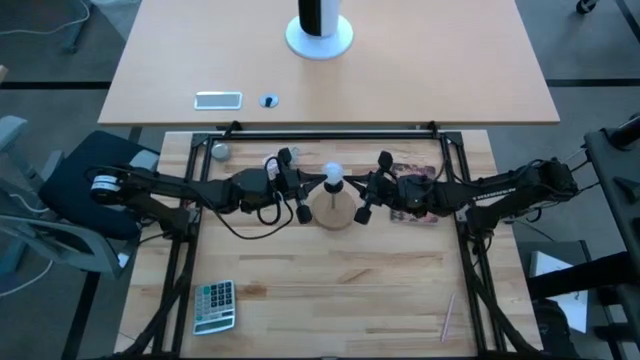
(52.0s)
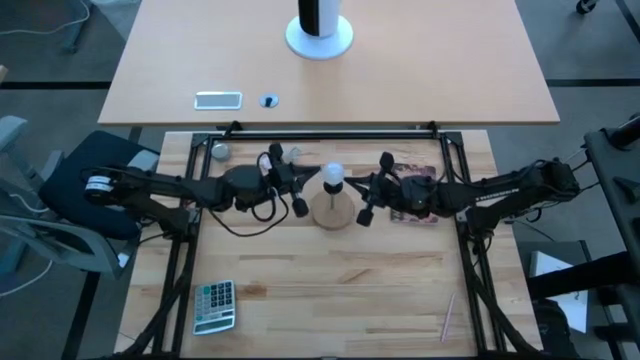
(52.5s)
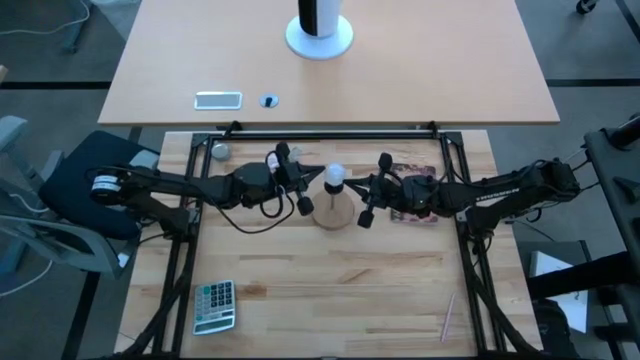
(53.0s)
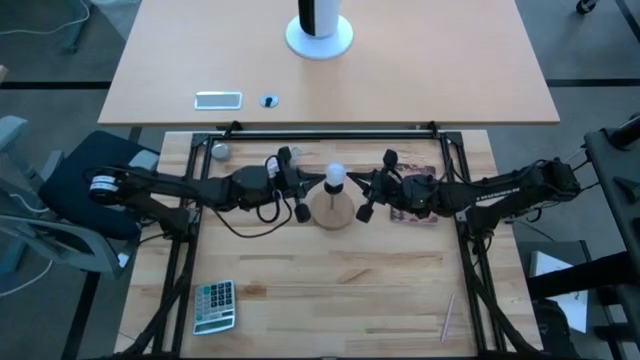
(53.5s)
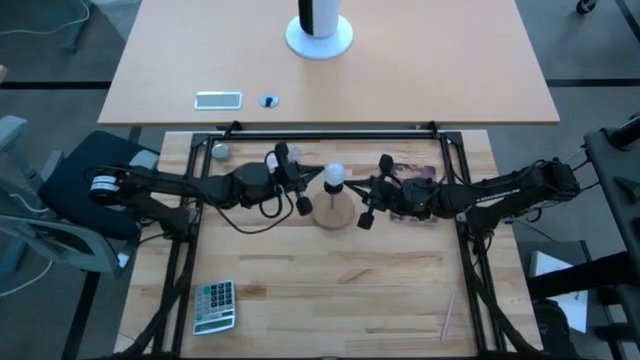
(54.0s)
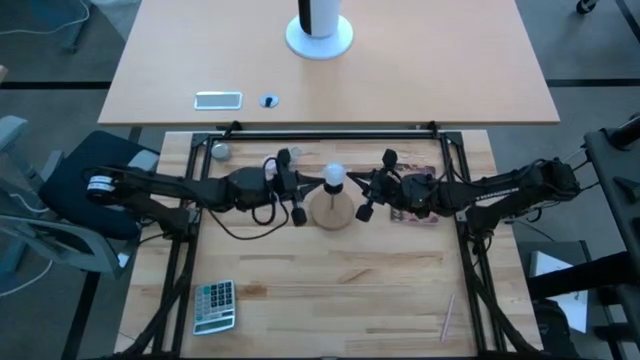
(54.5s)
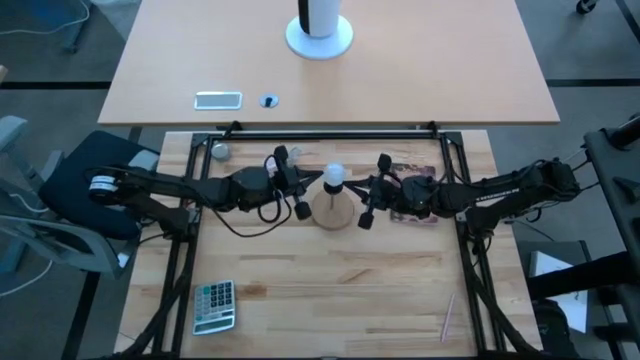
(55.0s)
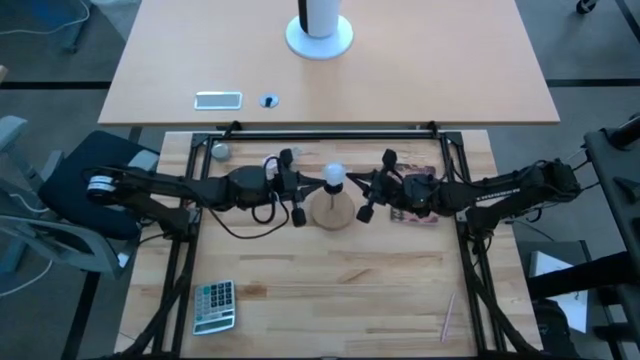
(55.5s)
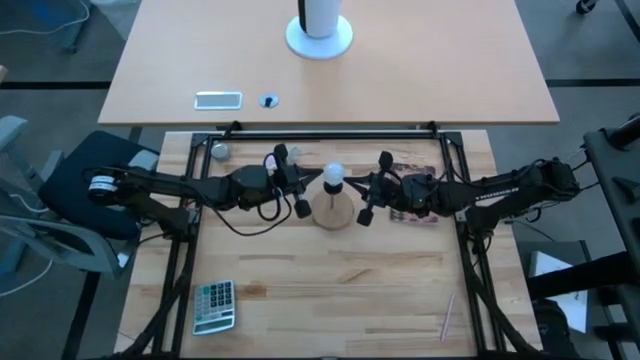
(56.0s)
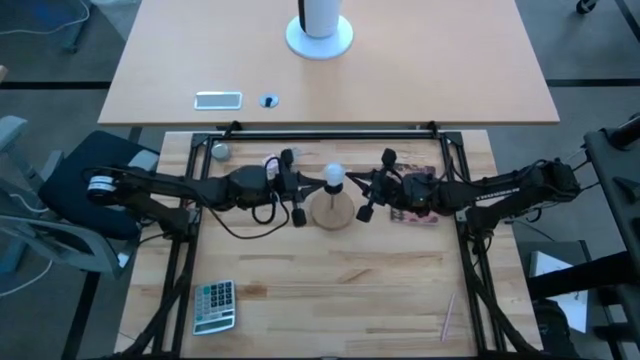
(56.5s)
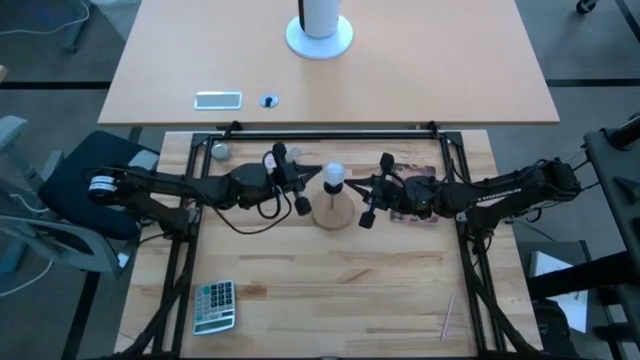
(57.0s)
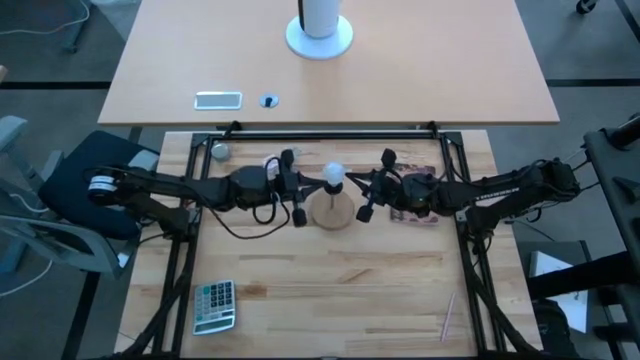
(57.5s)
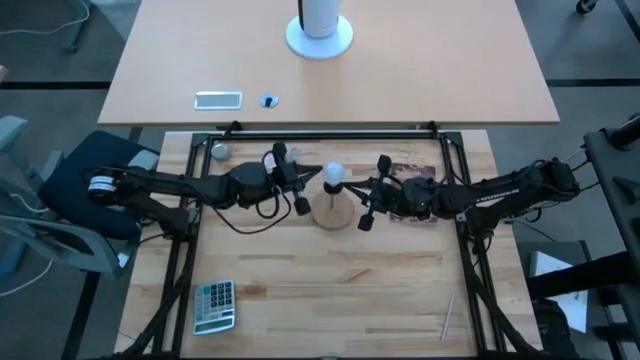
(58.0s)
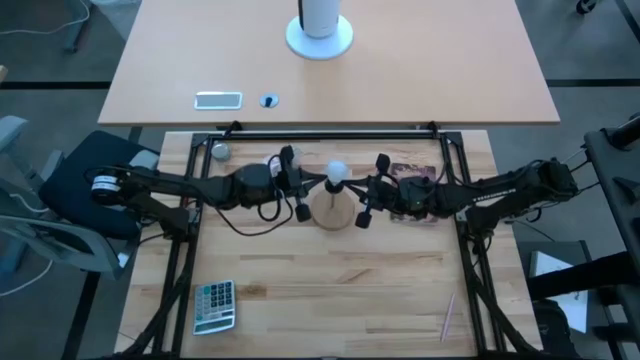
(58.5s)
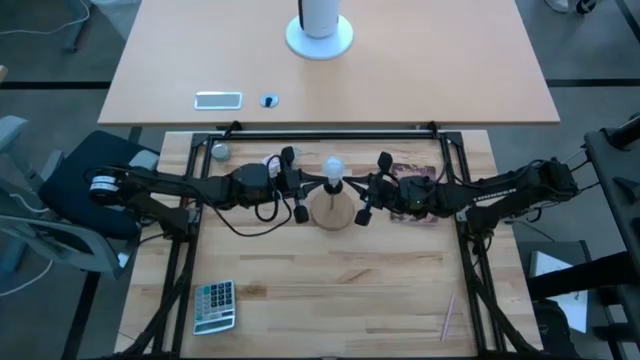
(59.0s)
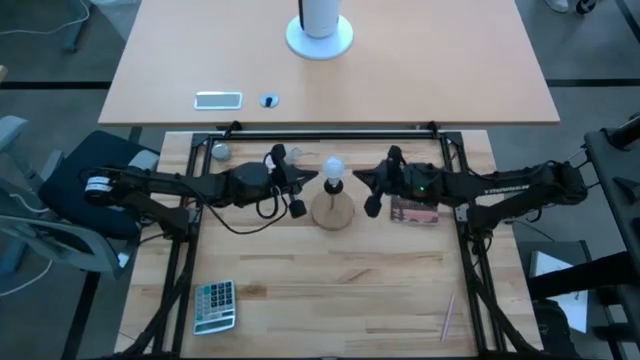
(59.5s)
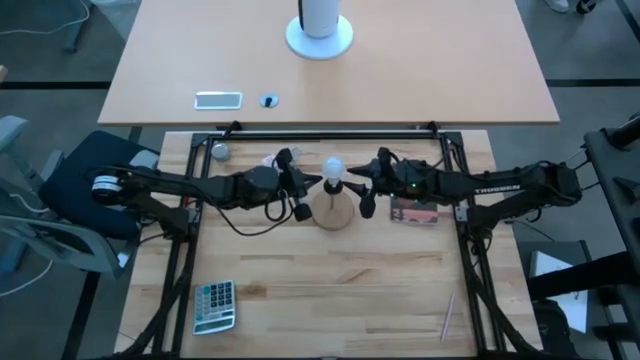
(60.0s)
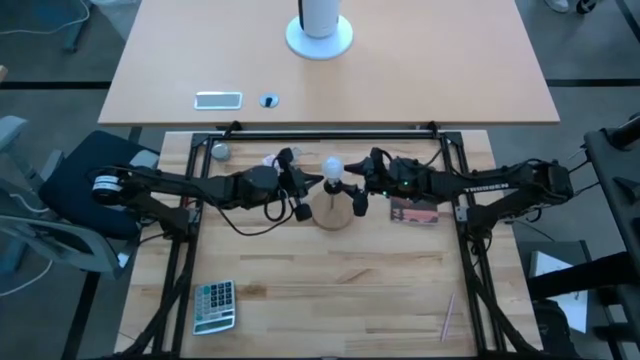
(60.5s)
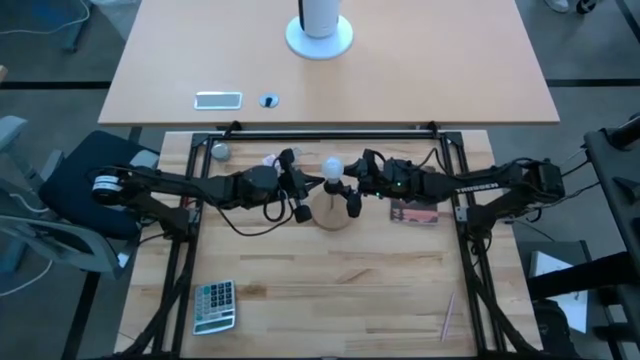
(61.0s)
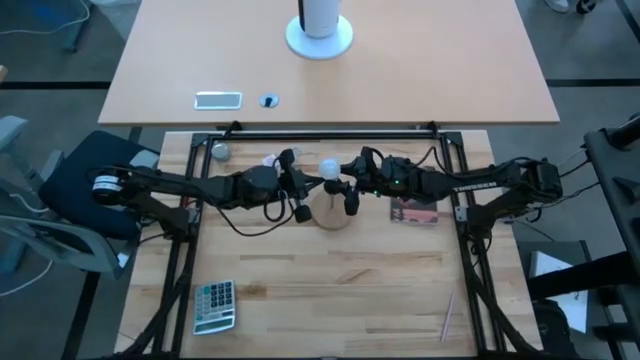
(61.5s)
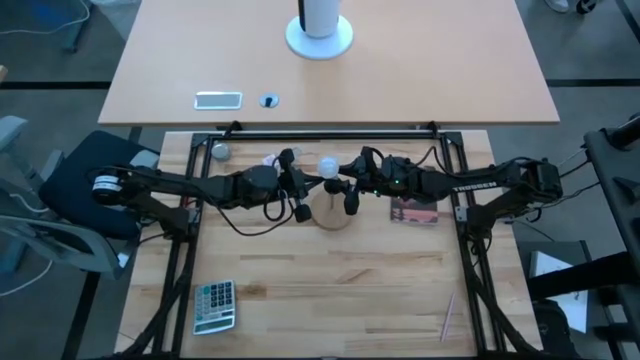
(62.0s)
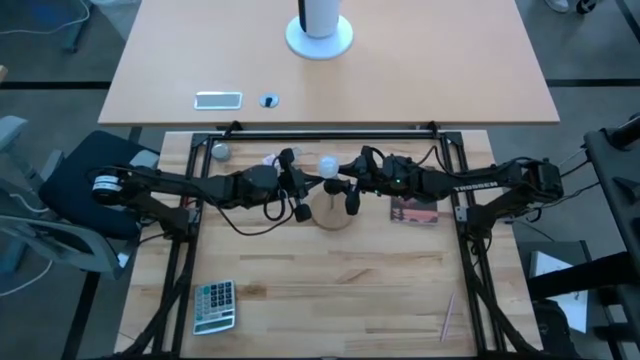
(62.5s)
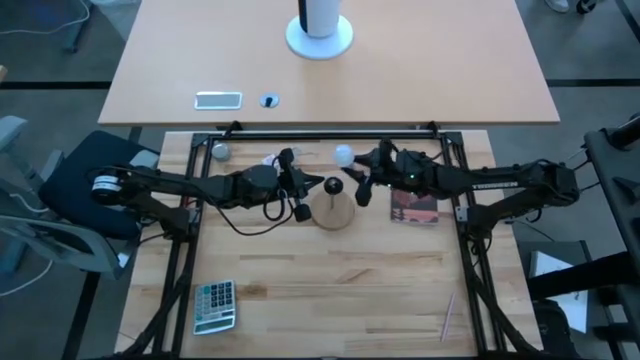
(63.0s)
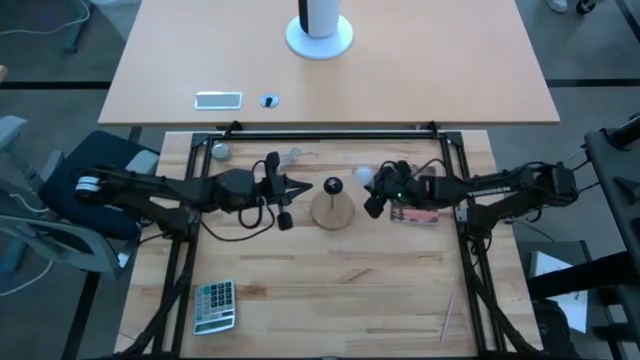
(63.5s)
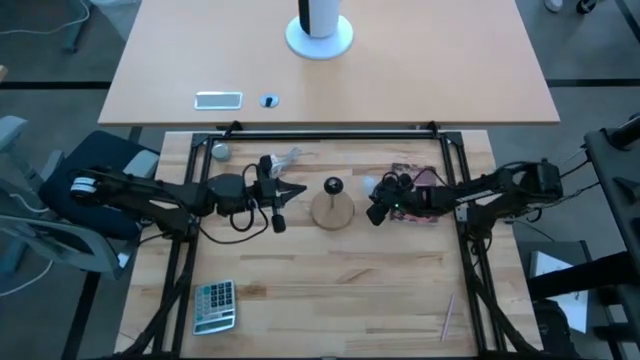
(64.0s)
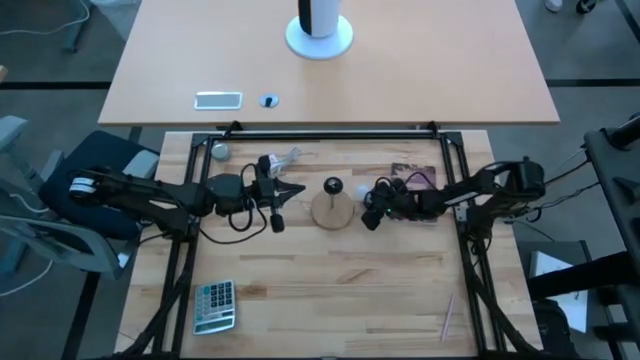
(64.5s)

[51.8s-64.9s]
Task: Screw lightbulb
Remove the lightbulb from the lamp

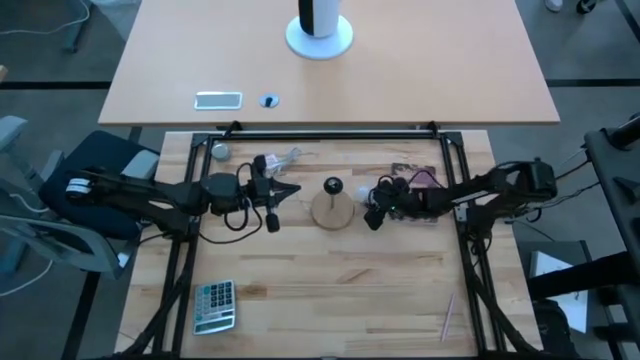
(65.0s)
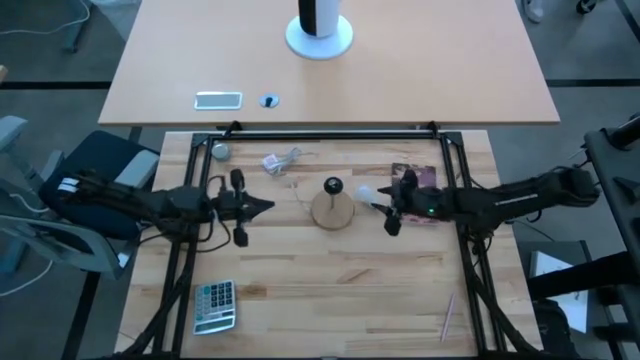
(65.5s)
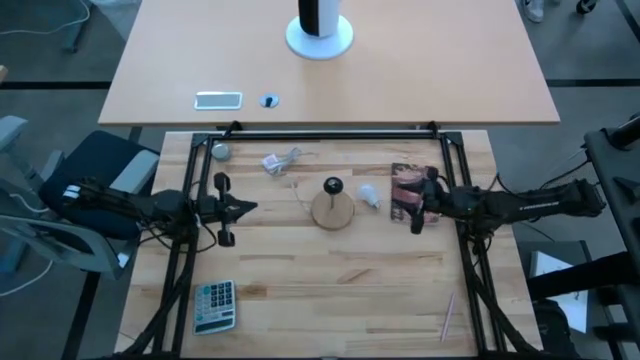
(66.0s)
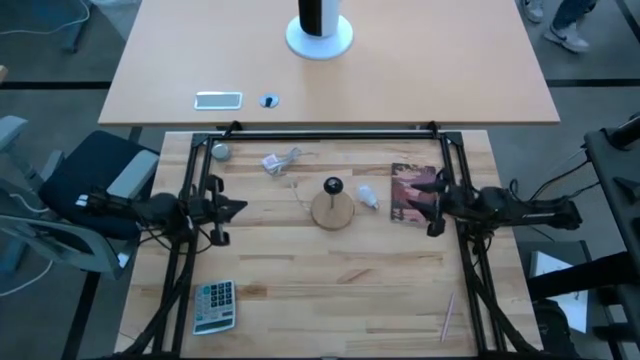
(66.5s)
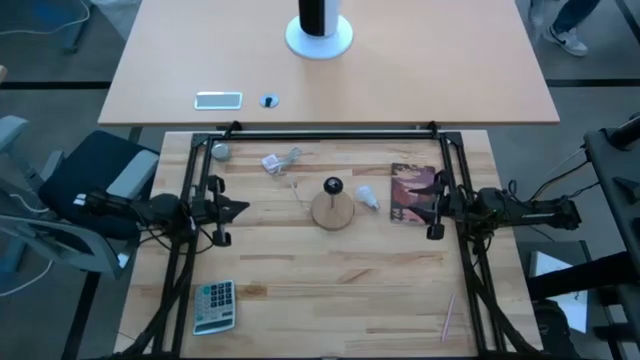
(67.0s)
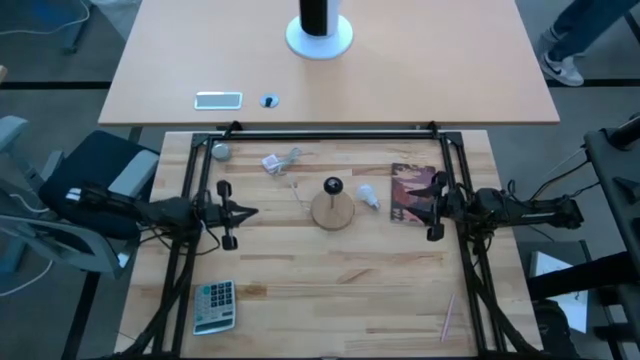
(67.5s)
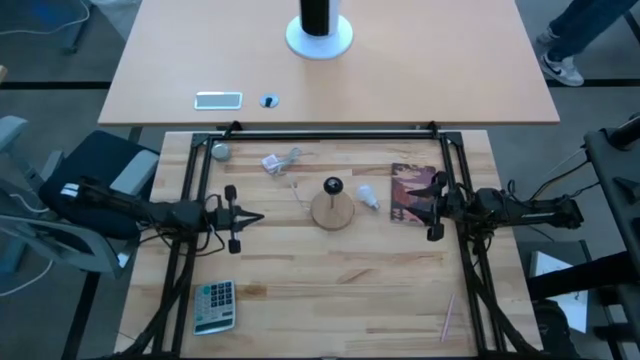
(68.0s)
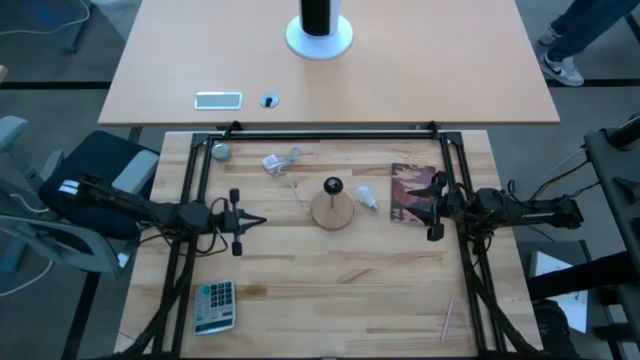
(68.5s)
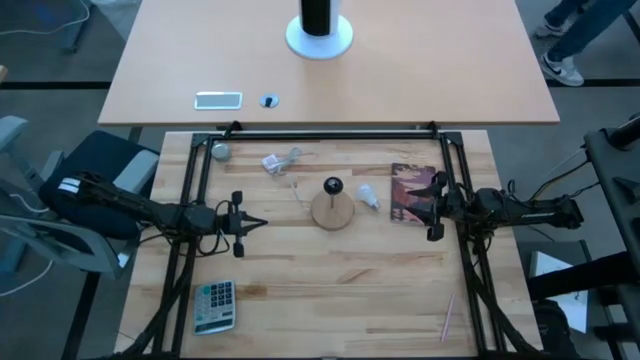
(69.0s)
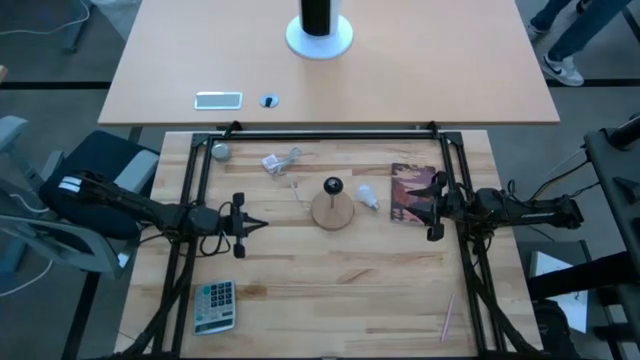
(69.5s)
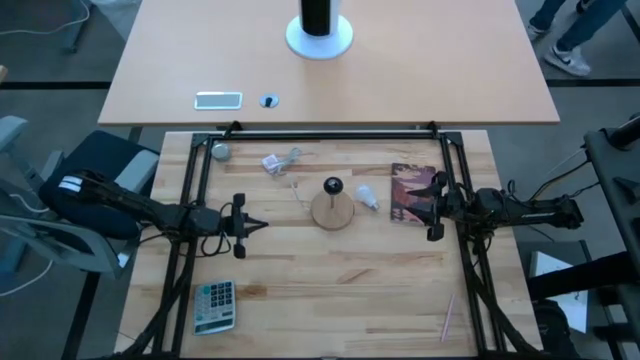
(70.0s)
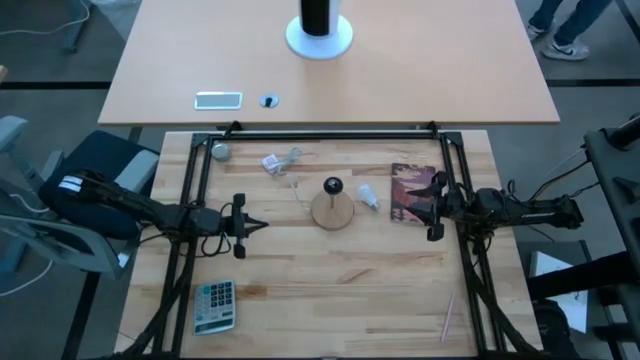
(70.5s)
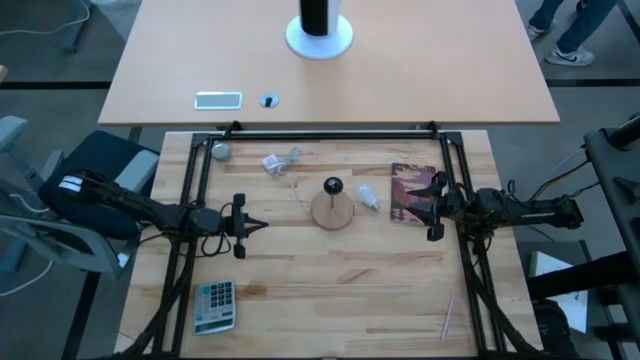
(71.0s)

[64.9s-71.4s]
Return to Home Position

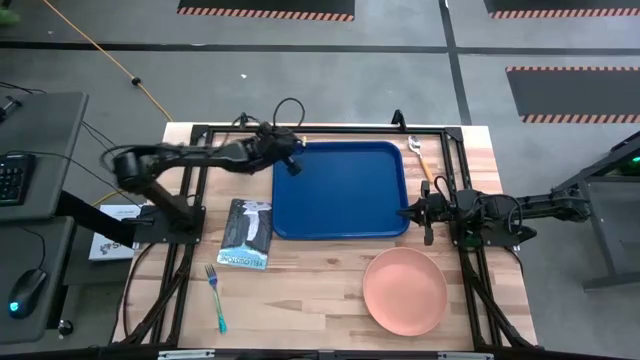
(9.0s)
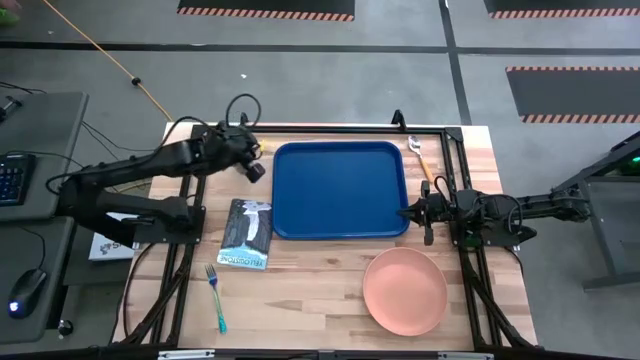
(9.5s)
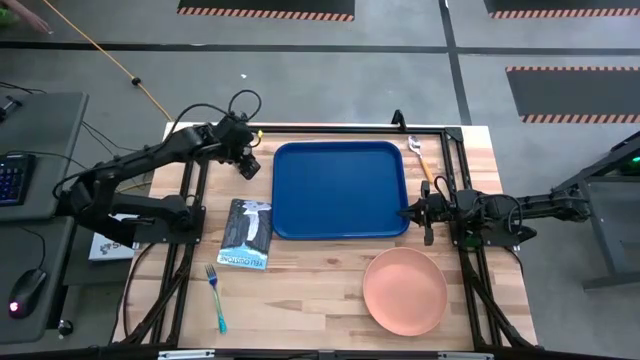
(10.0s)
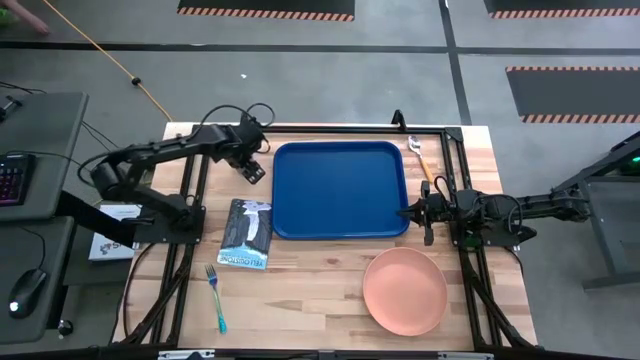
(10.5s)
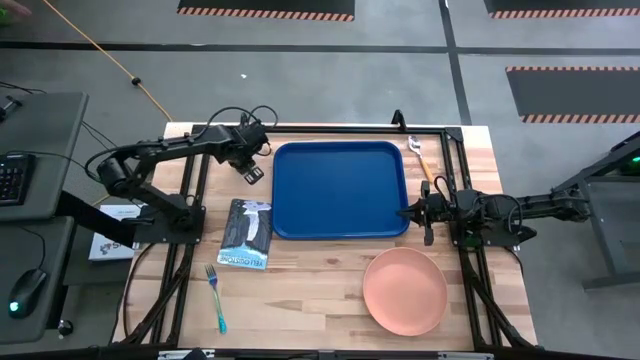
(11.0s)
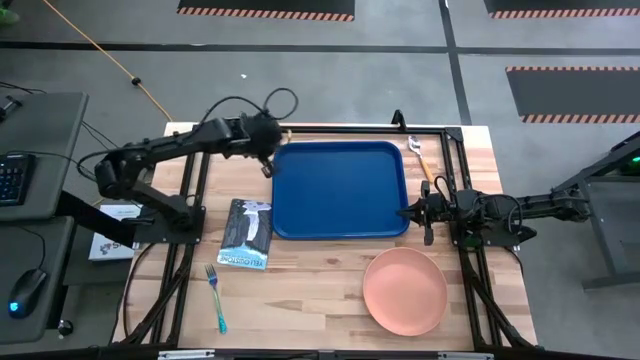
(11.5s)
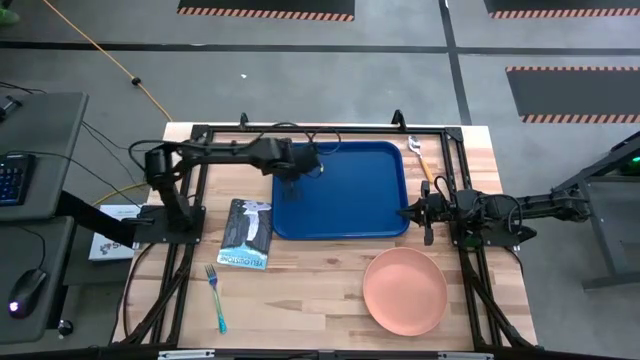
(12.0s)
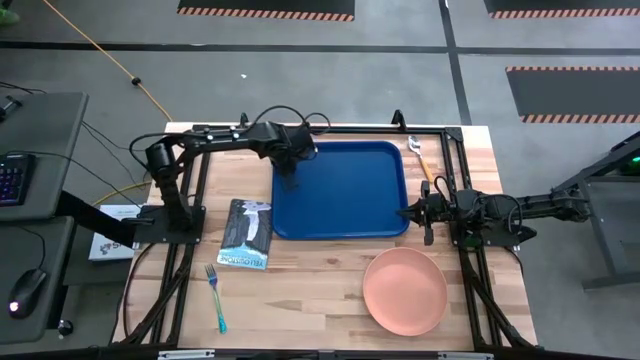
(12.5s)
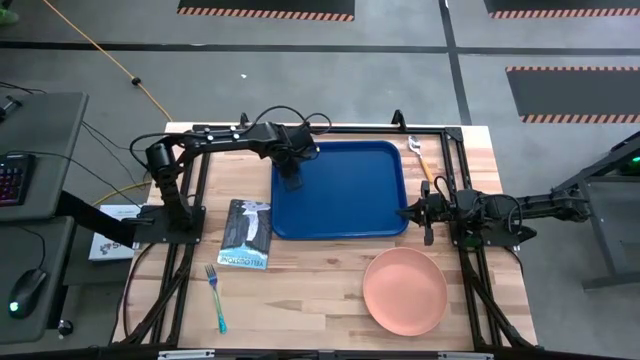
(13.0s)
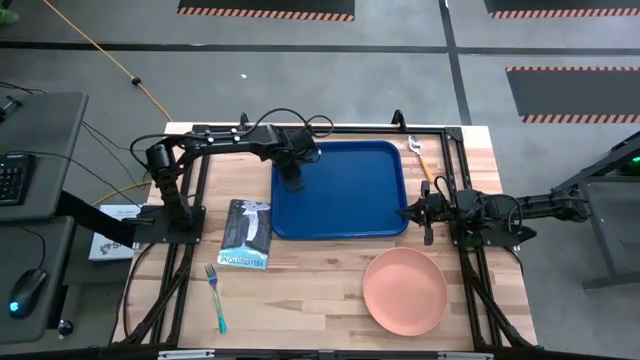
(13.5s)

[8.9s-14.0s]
Task: Pick and place plate/cup/fork/spoon on tray
Put the black cup on the top left of the blue tray
